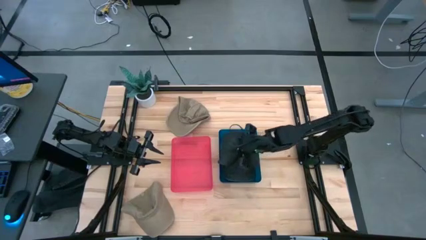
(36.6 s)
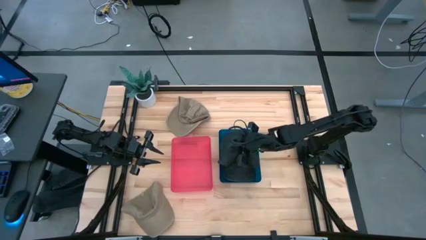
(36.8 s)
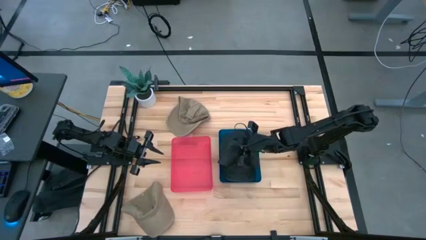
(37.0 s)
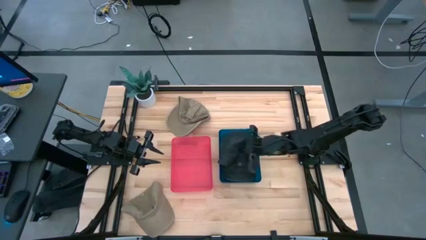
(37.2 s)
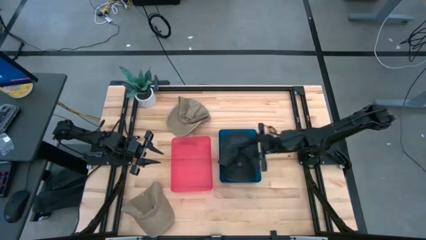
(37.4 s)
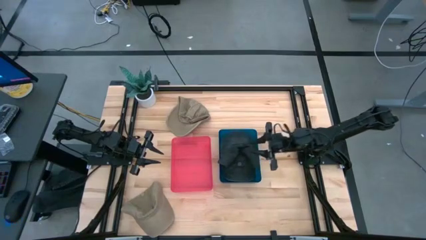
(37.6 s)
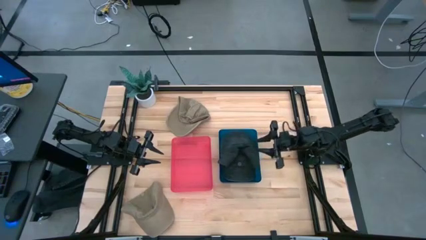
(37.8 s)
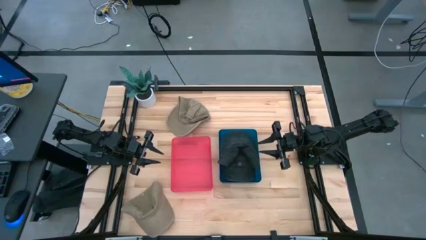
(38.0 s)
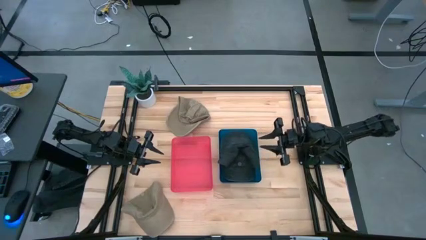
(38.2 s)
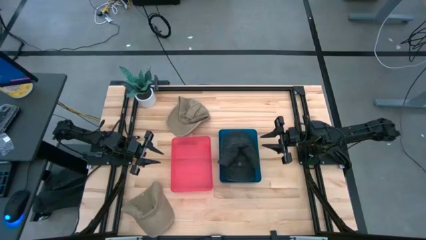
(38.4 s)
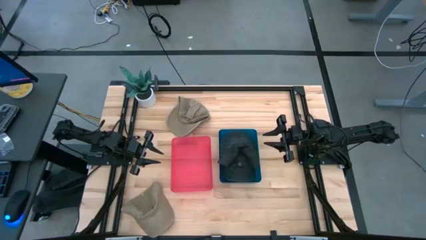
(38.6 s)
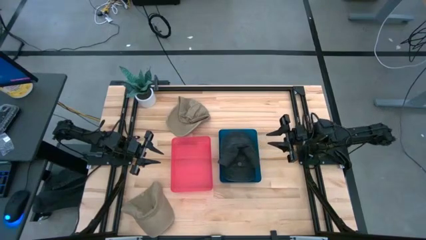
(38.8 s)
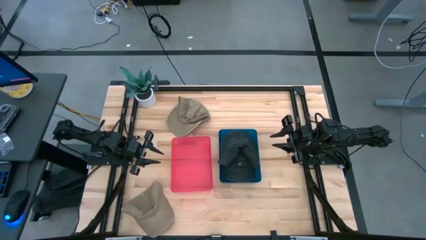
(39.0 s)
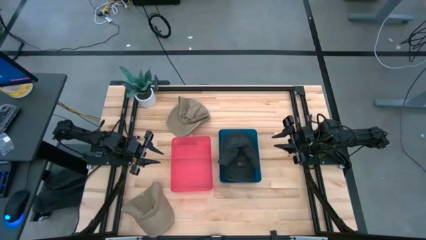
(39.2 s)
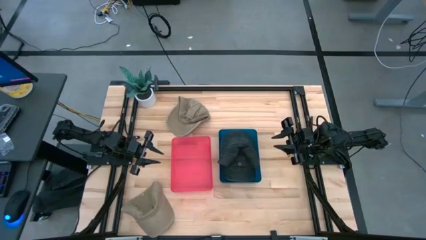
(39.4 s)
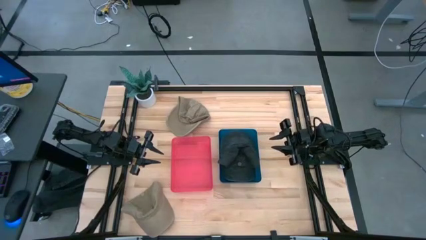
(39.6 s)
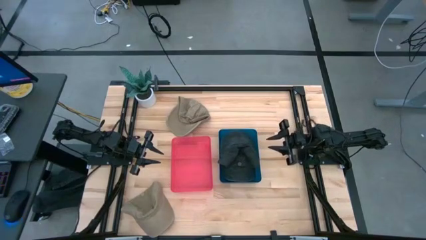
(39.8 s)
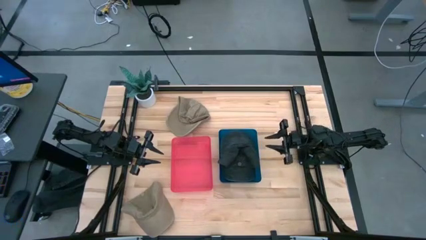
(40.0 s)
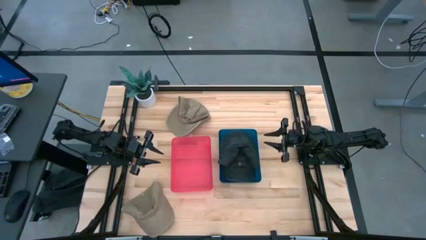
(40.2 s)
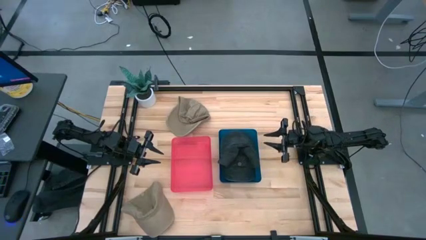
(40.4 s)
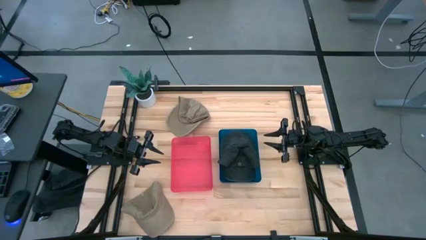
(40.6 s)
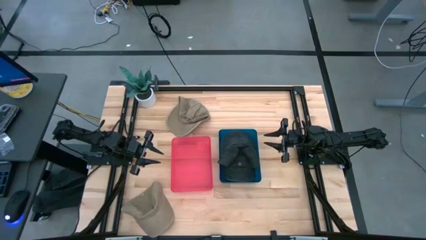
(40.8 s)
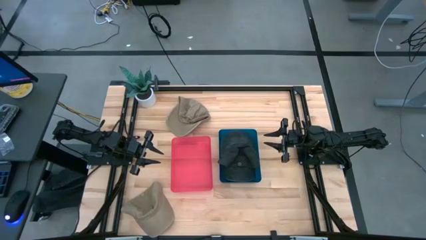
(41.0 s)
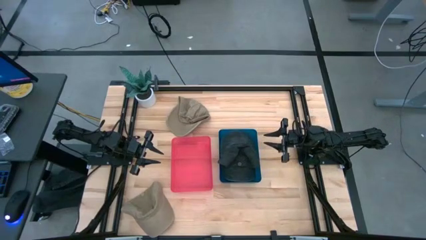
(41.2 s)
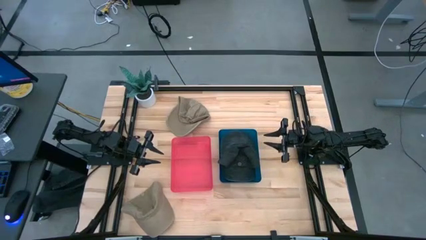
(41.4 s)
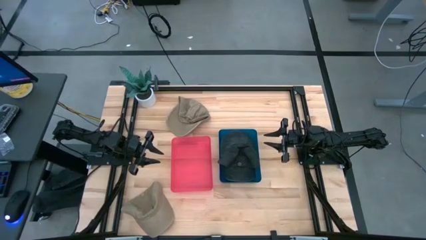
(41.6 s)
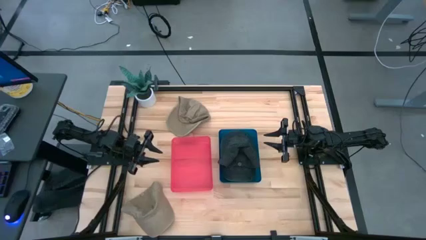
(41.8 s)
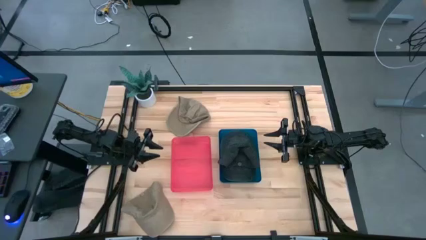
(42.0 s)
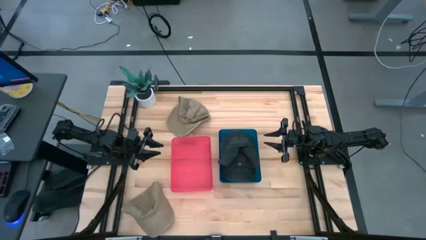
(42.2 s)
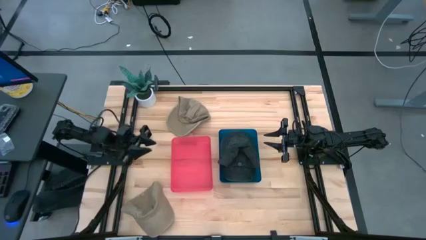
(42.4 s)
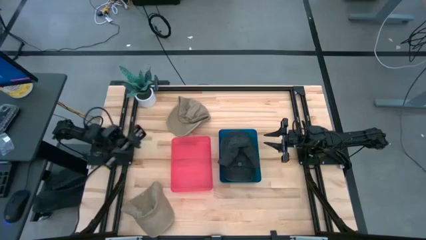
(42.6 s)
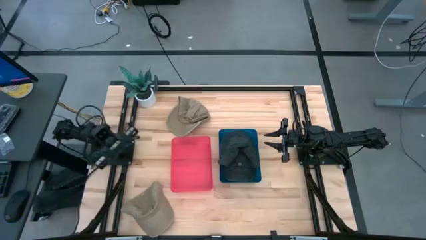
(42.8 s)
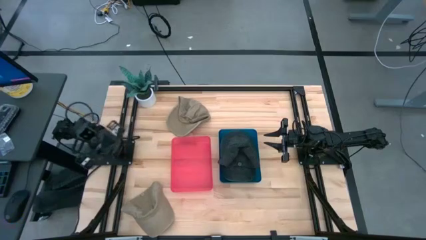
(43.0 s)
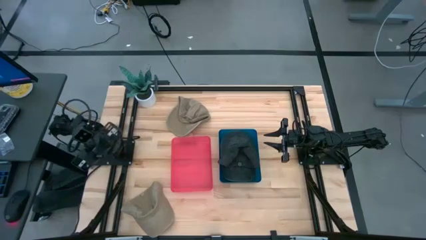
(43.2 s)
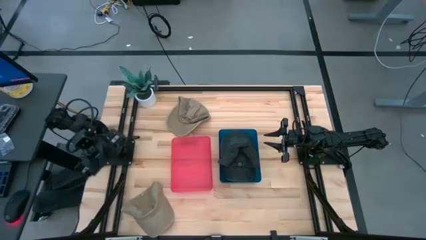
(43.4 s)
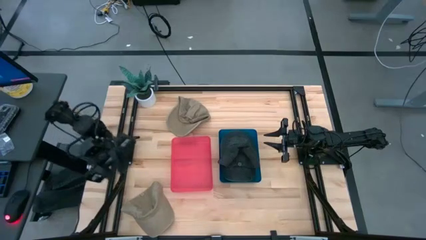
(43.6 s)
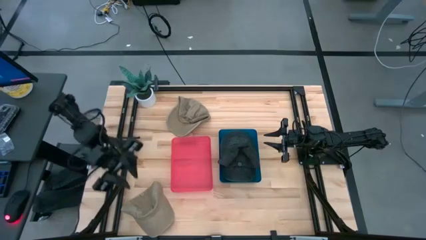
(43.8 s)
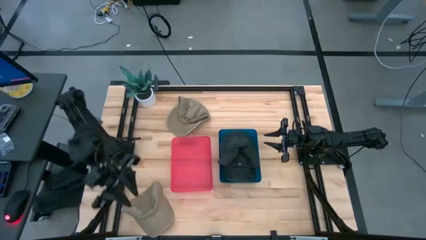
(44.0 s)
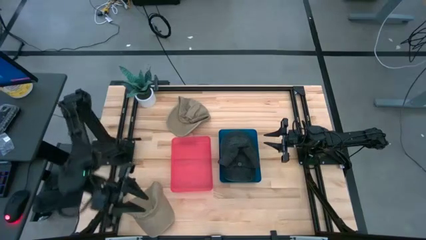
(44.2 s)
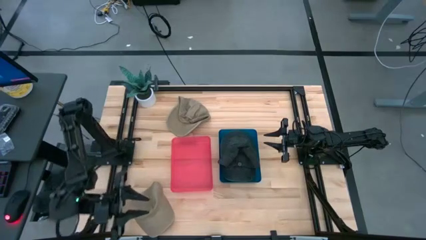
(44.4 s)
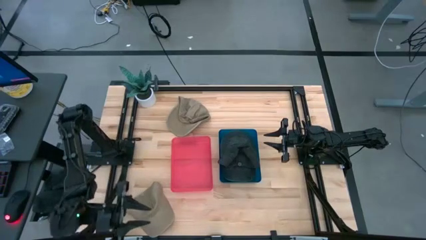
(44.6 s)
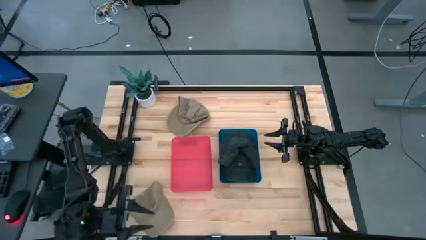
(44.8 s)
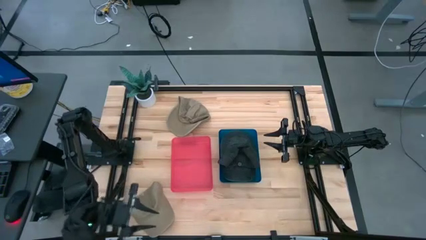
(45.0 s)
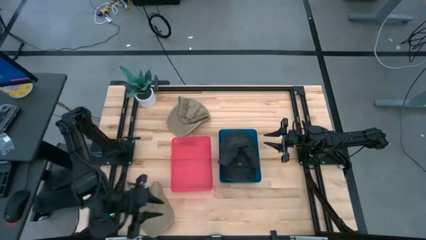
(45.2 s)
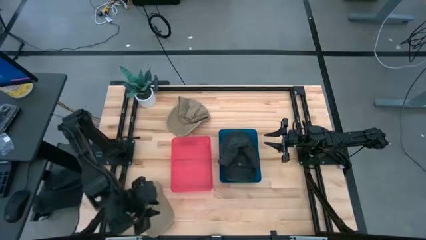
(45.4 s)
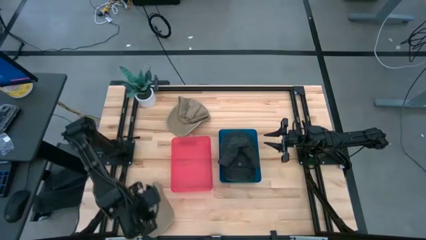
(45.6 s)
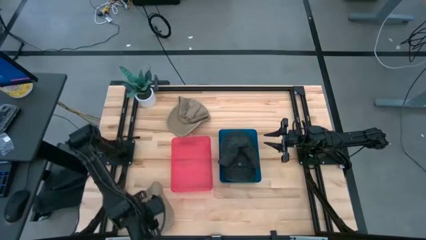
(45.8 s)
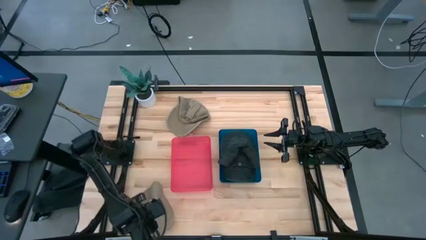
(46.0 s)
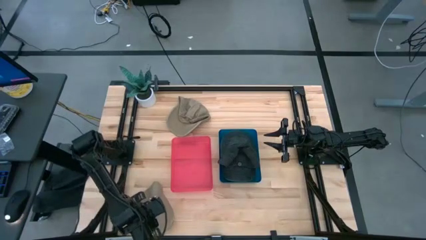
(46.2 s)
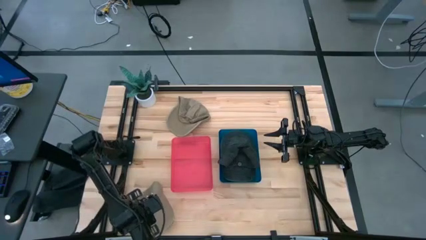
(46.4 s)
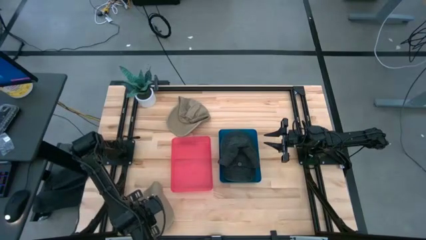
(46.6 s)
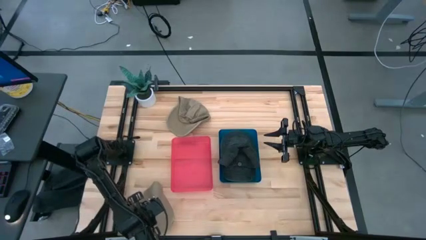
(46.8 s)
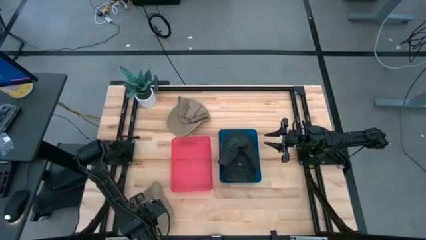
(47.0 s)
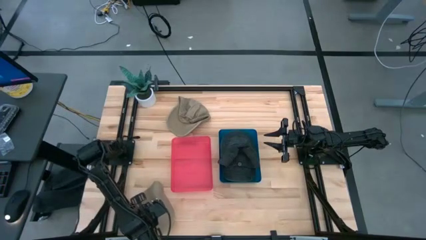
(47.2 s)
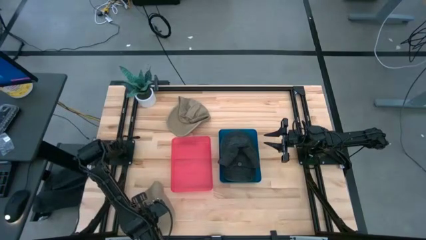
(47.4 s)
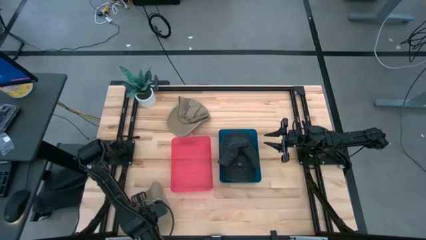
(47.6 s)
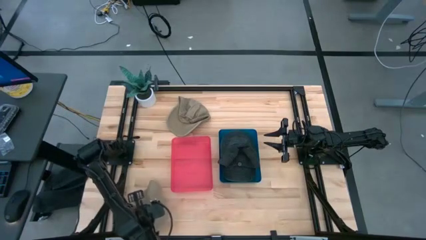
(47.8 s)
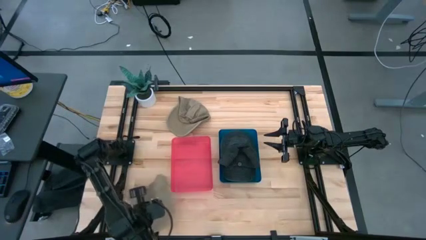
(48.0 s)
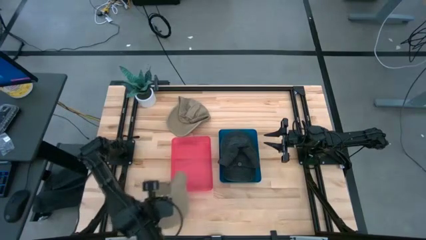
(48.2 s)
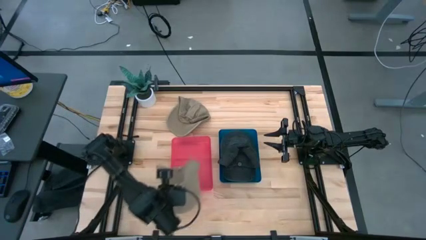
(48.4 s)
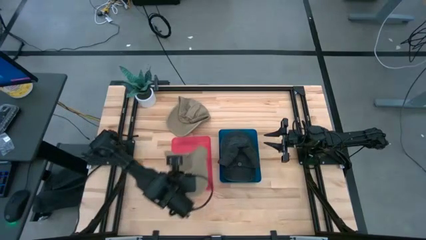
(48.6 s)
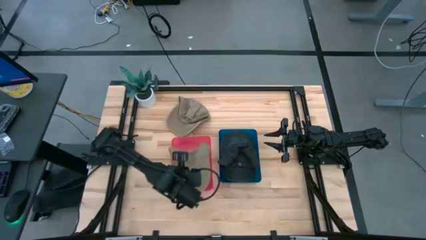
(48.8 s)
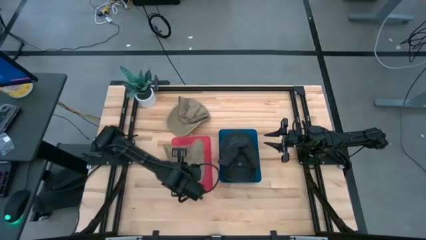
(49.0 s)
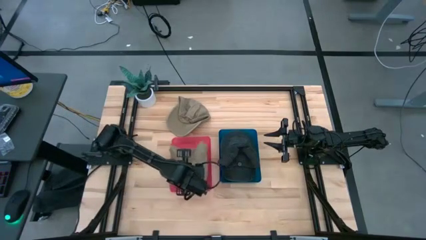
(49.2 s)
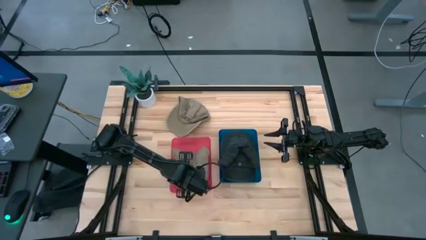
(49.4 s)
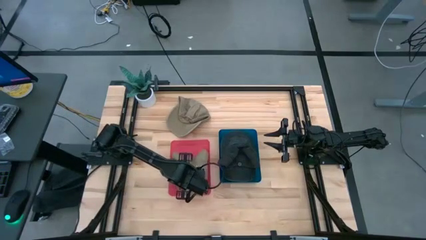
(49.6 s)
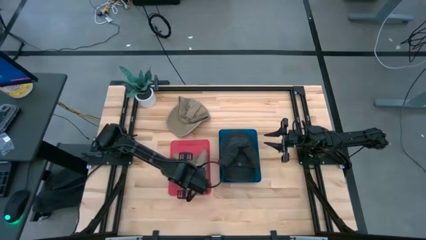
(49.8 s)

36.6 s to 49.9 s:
Task: Pick & Place hat
Put the bottom brown cap into the red bin

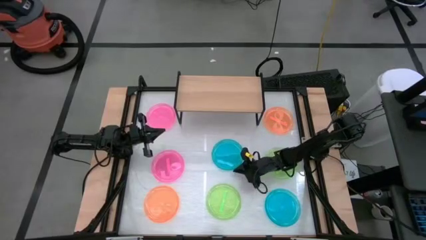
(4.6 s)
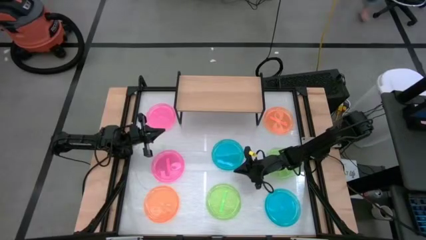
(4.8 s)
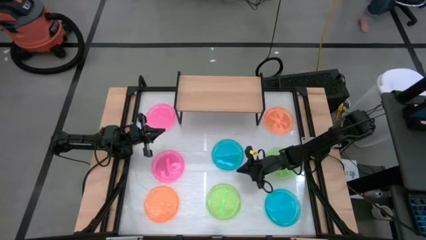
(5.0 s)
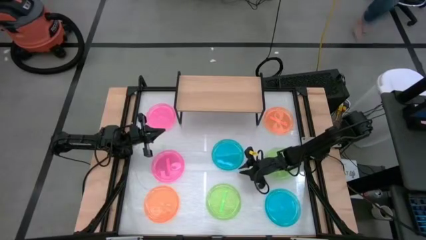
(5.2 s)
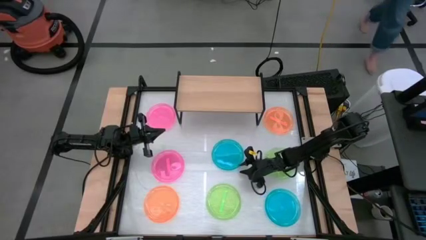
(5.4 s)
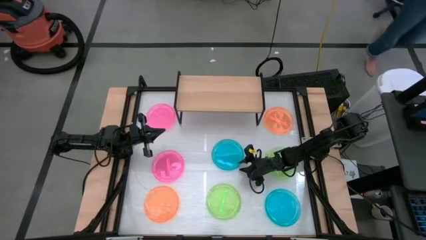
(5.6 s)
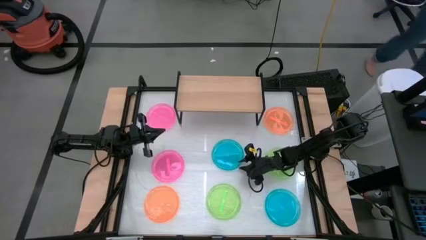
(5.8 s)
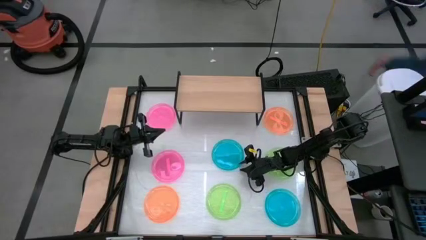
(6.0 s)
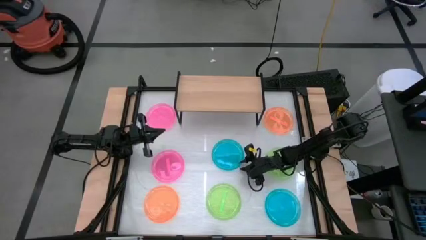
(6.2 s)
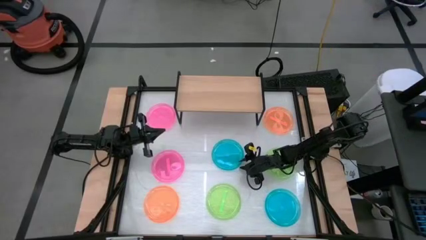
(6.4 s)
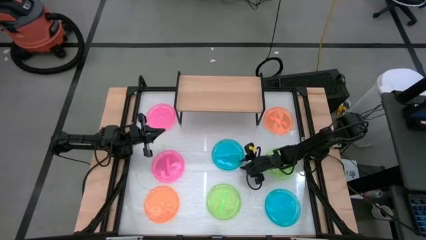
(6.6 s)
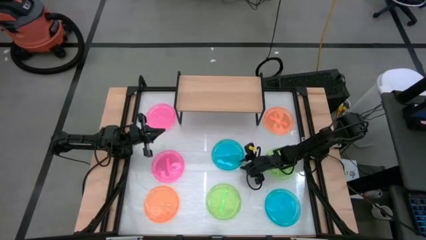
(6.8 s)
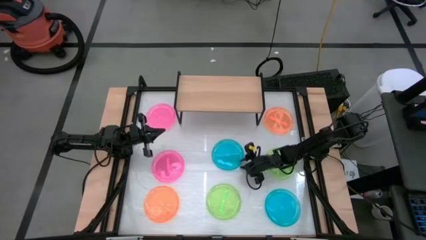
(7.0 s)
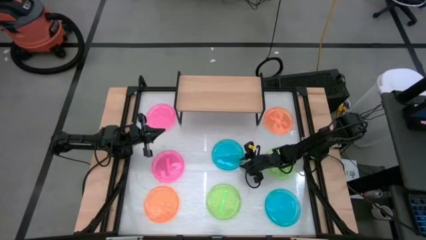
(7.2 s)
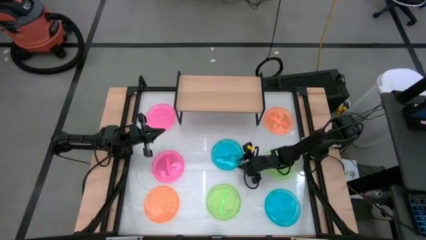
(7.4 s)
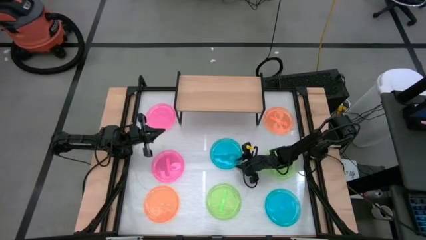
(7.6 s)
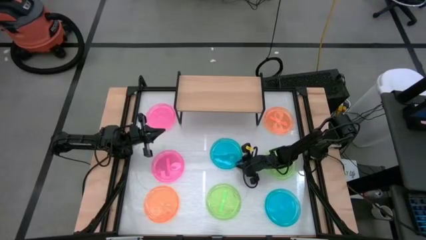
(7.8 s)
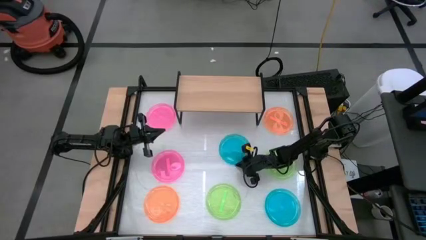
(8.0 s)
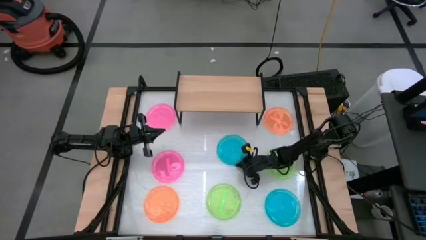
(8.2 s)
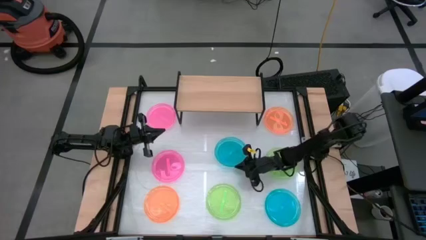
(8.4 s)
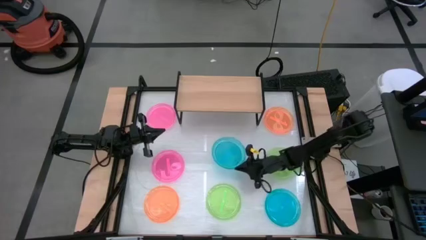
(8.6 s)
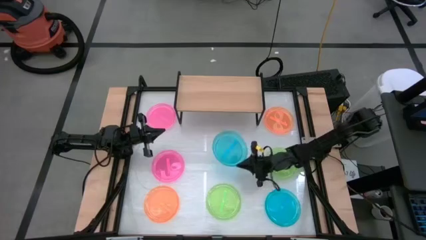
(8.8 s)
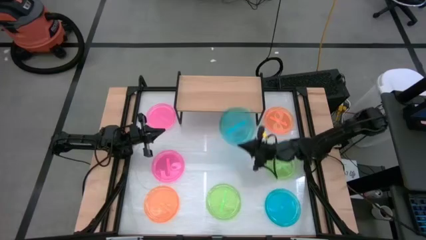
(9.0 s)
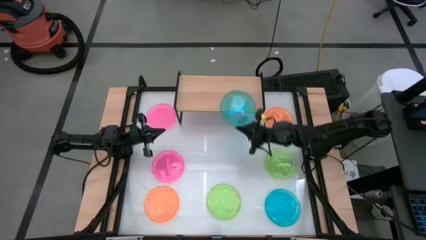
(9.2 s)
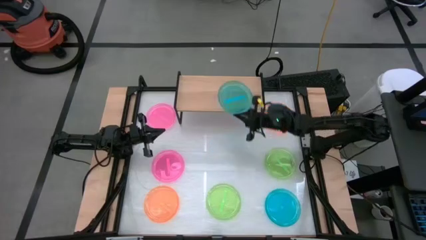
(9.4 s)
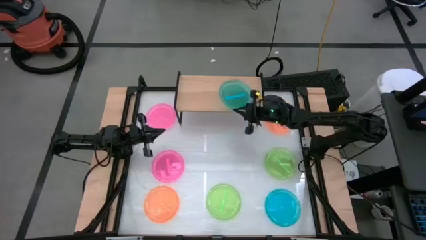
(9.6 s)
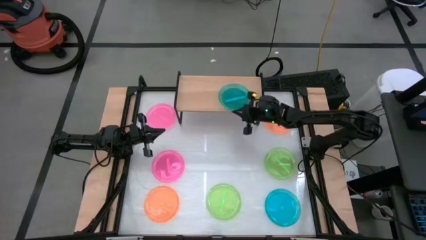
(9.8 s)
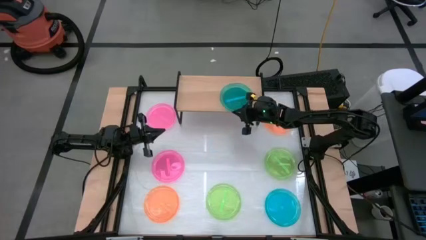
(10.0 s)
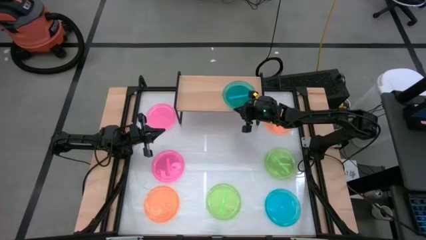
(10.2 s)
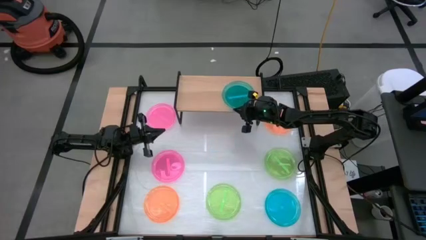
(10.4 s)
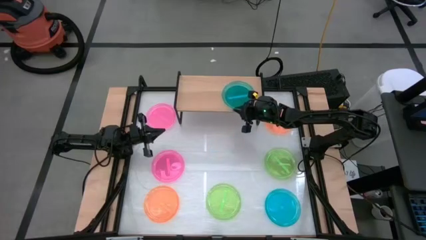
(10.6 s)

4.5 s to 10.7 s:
Task: Place and stack plates onto a shelf
Put the top blue plate on the shelf
